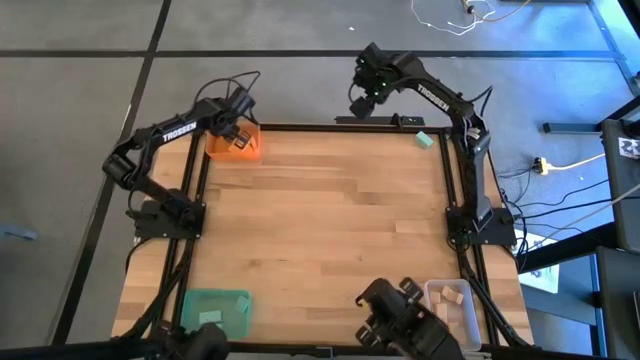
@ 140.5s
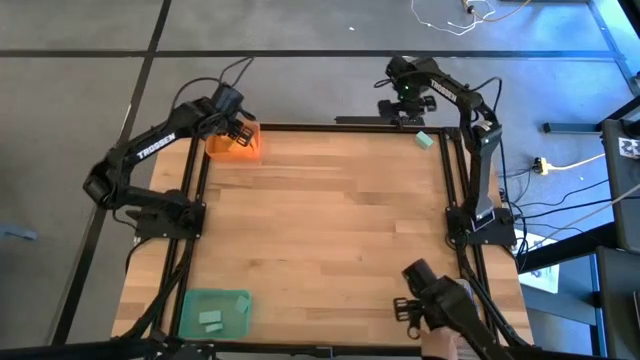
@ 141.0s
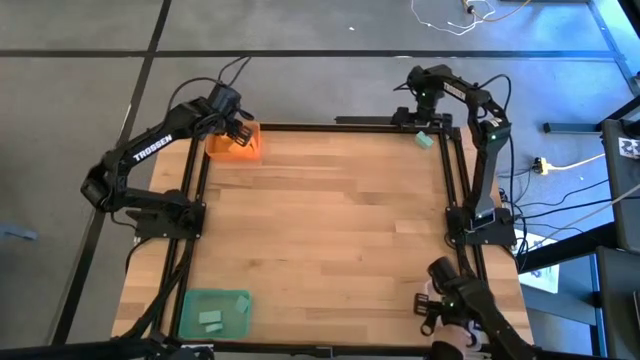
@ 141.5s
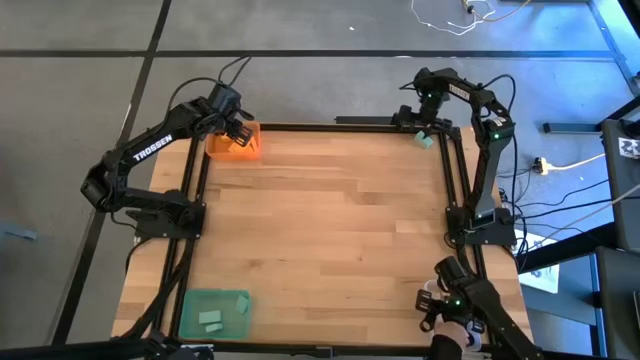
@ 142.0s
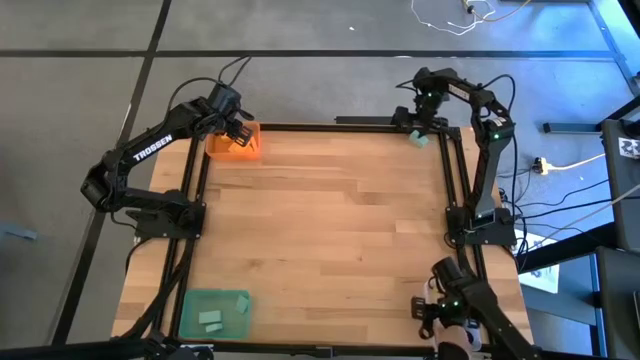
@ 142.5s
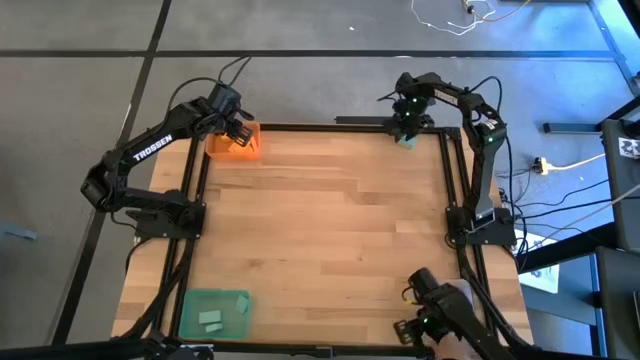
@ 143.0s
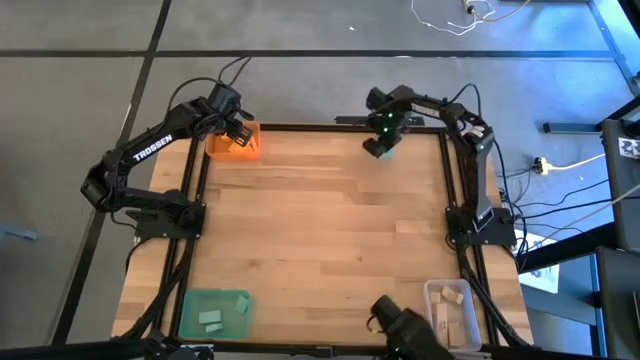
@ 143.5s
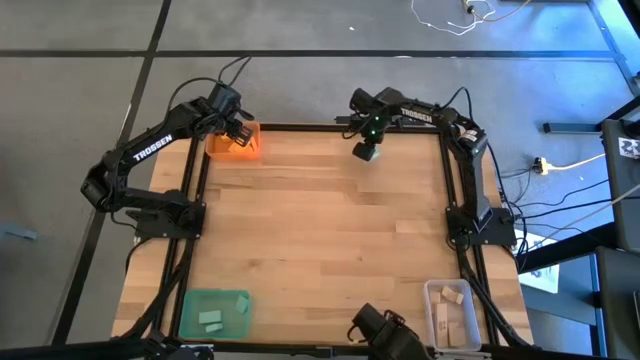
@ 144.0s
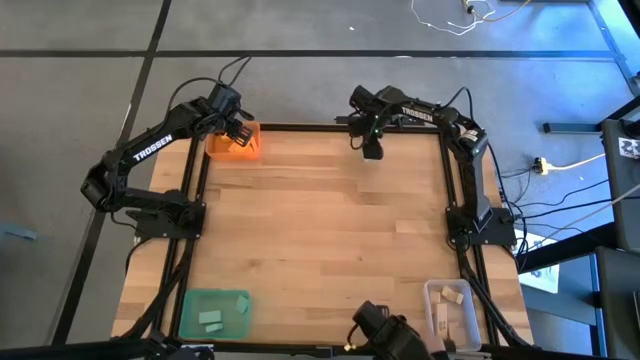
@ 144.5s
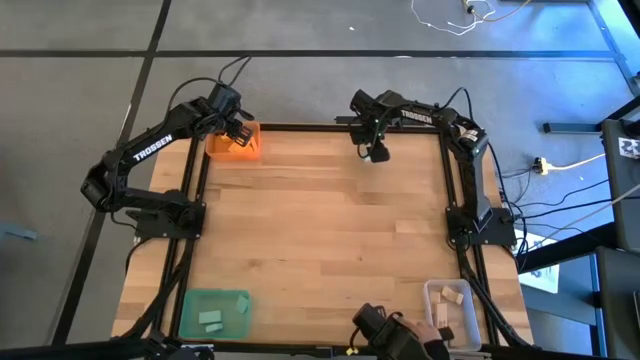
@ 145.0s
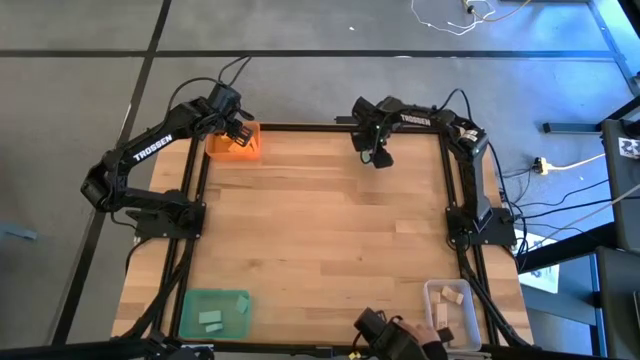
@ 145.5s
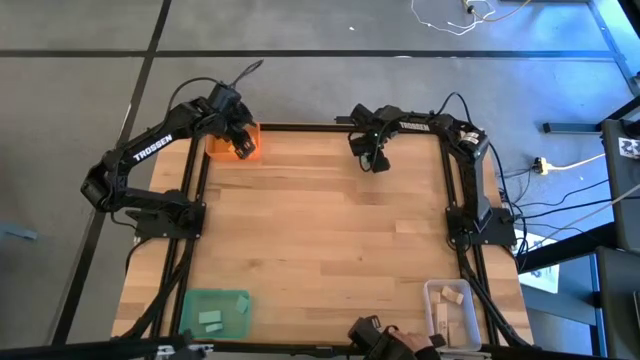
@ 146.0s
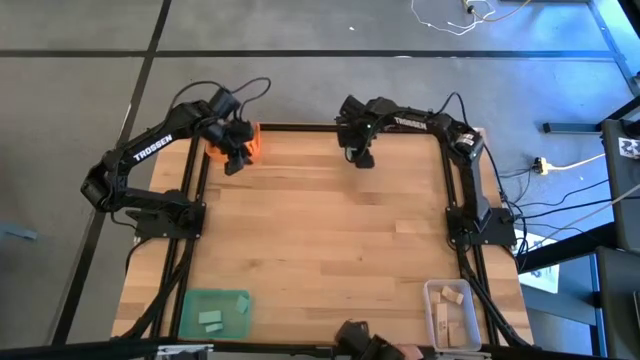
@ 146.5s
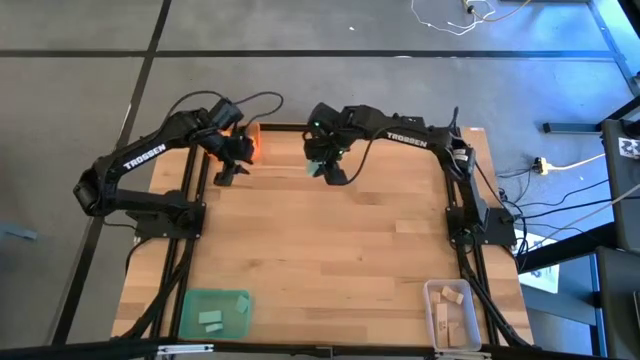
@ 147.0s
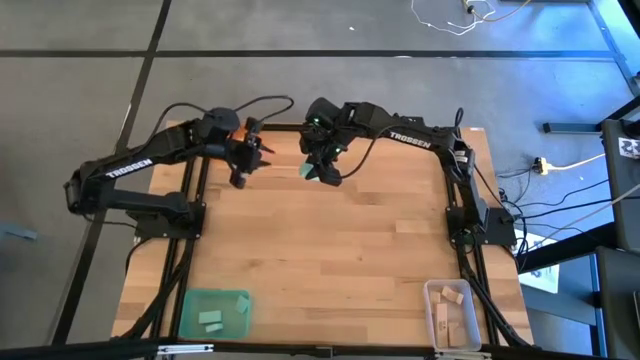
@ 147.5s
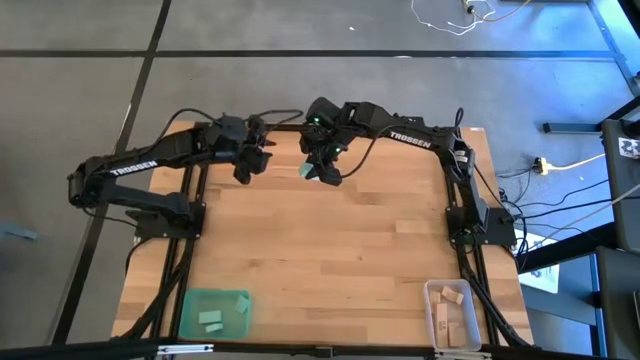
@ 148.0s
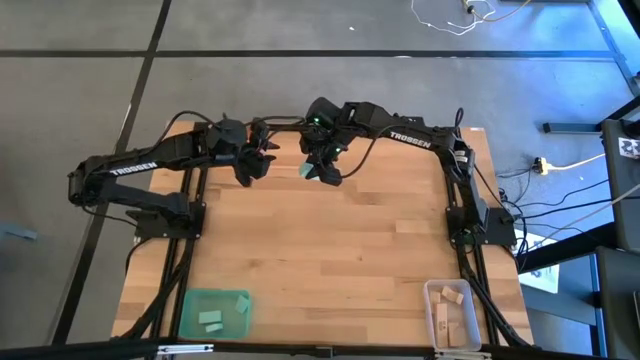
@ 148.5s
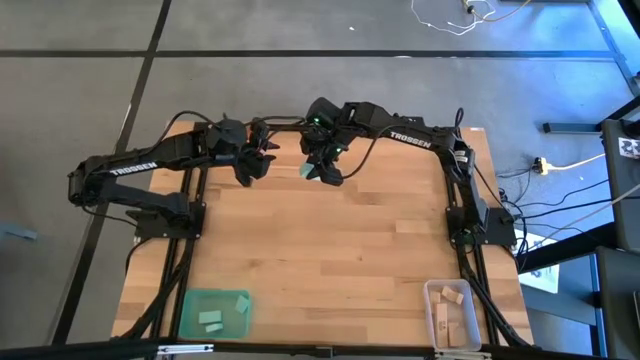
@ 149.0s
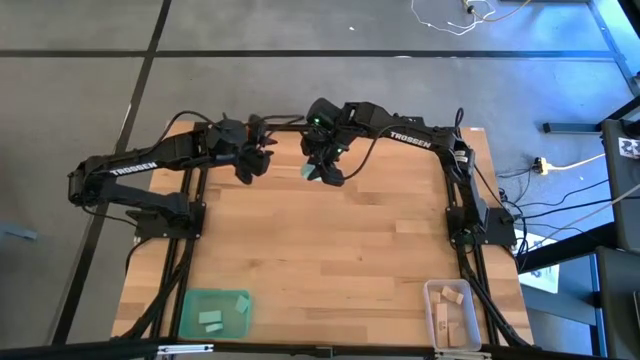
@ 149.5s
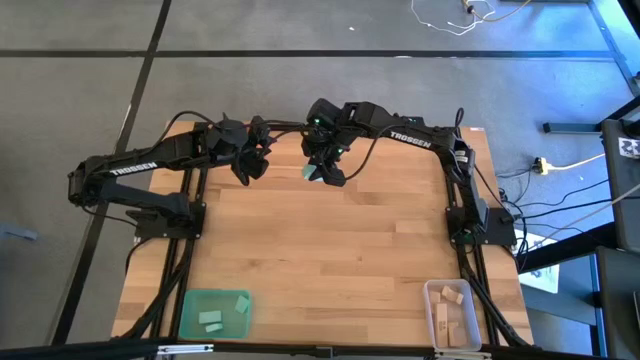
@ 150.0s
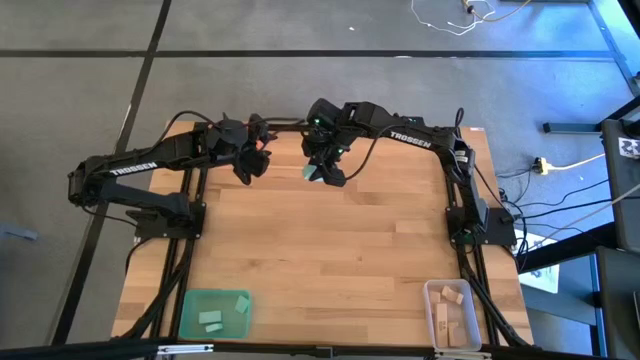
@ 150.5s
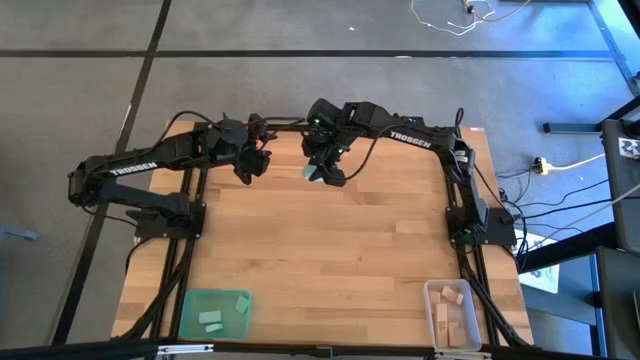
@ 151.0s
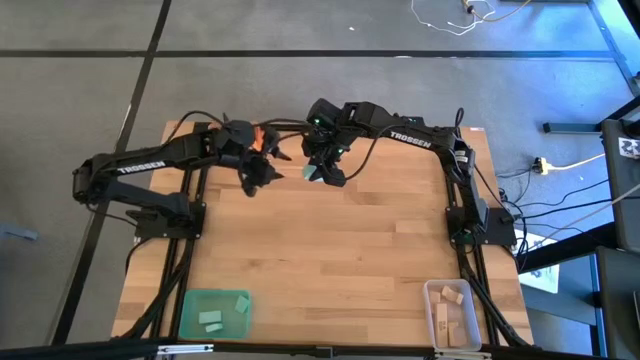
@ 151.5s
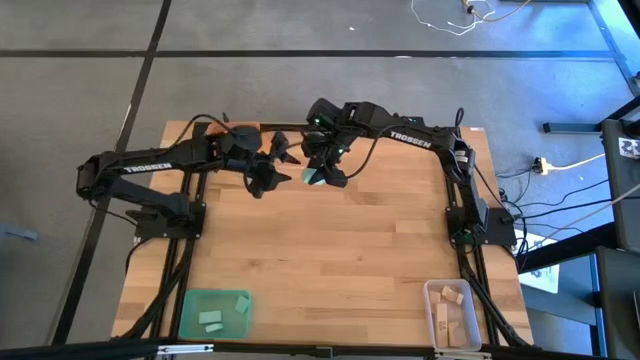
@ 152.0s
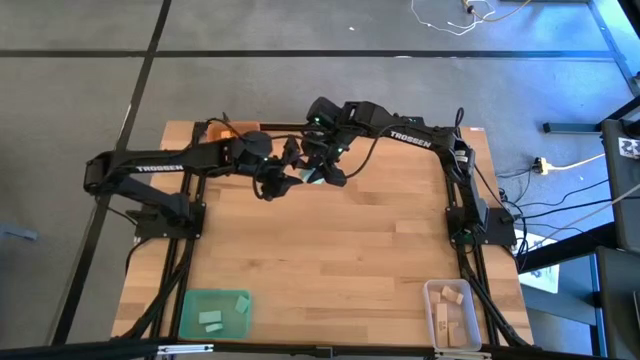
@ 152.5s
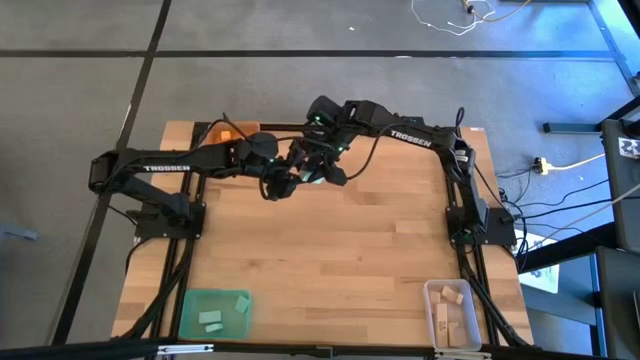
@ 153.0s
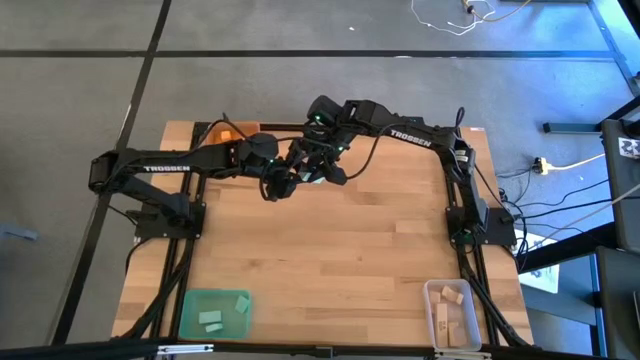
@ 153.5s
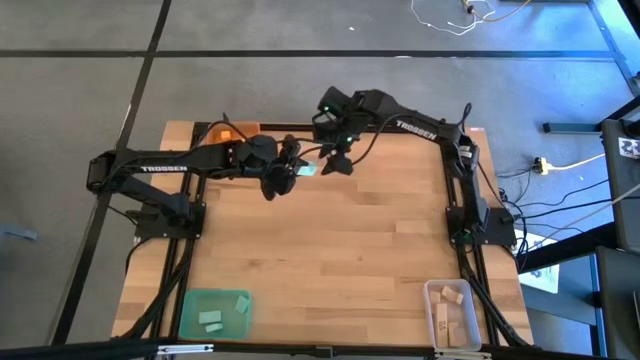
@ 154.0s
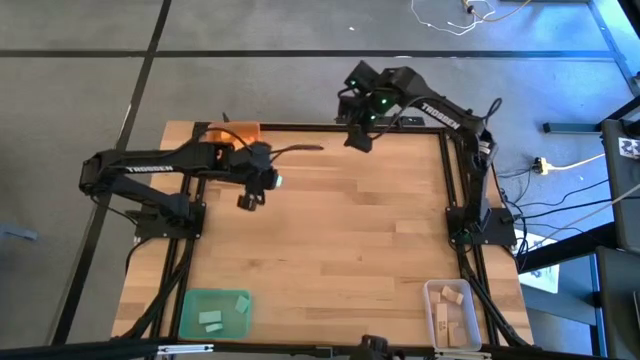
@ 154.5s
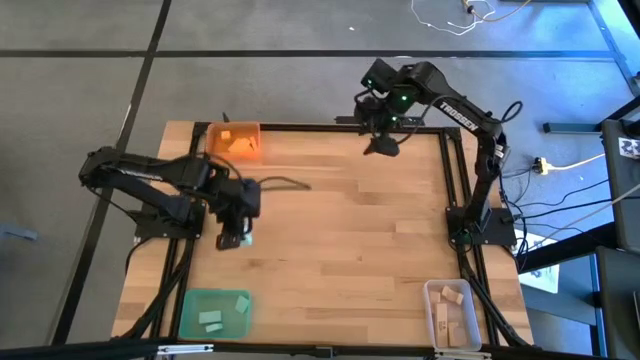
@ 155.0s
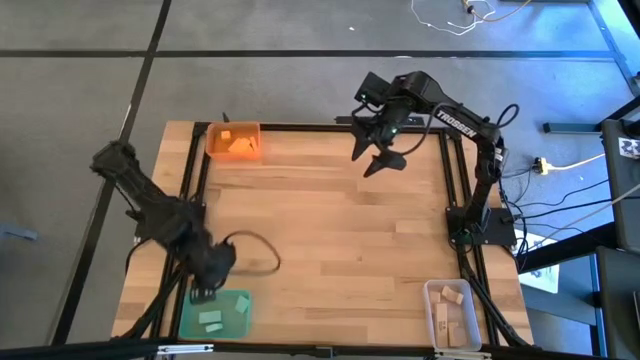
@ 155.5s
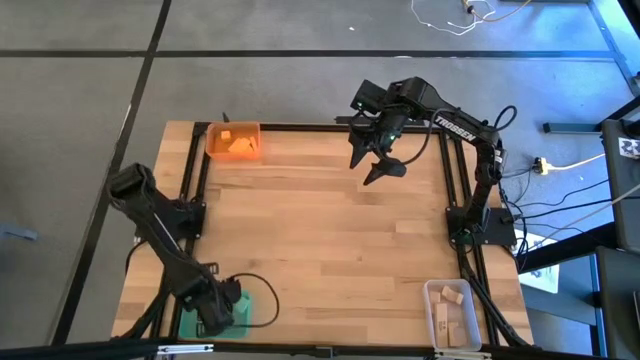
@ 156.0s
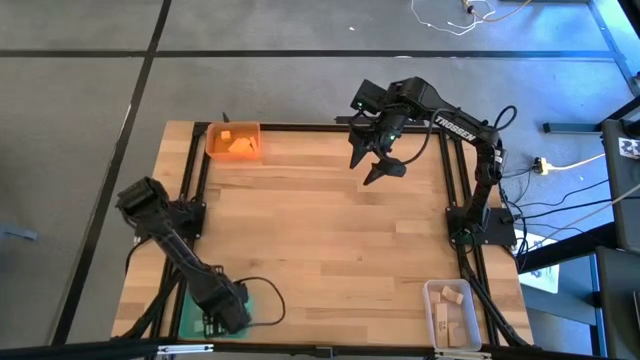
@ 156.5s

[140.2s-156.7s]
Task: Sort & place blocks by color
Put the blue block into the blue bin

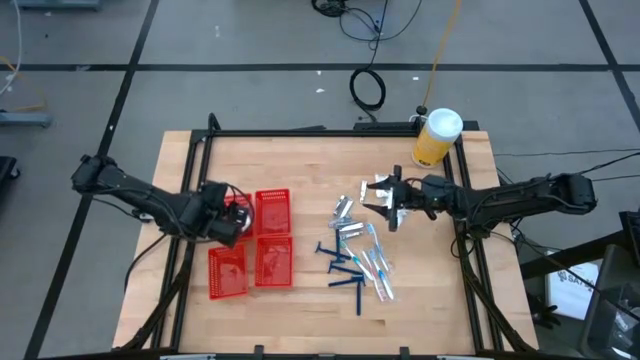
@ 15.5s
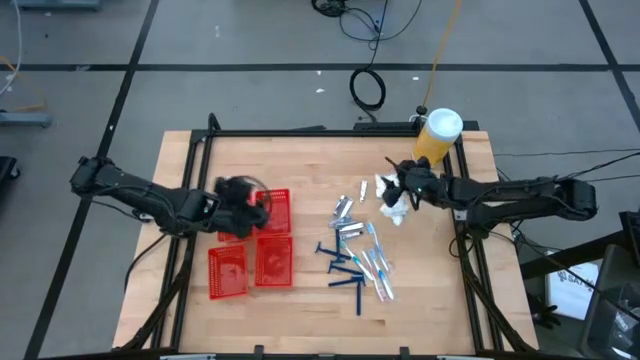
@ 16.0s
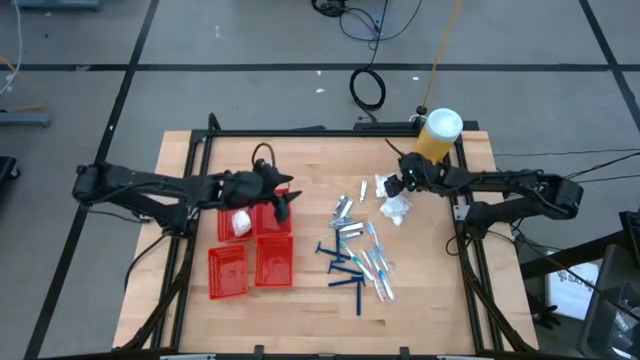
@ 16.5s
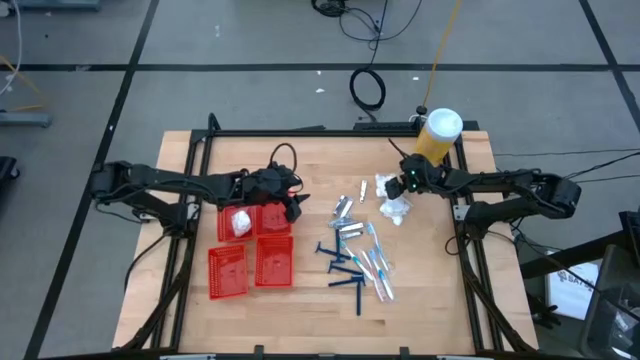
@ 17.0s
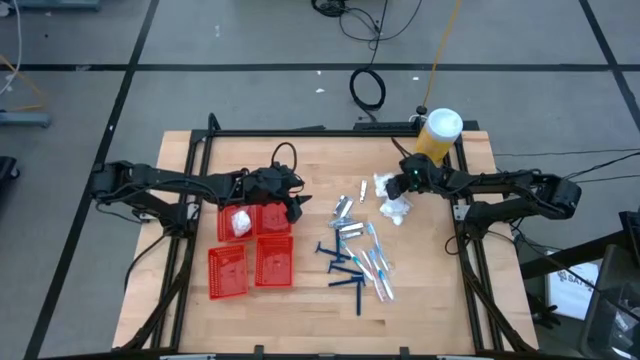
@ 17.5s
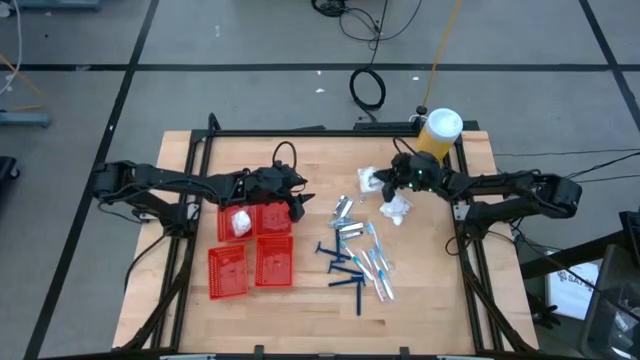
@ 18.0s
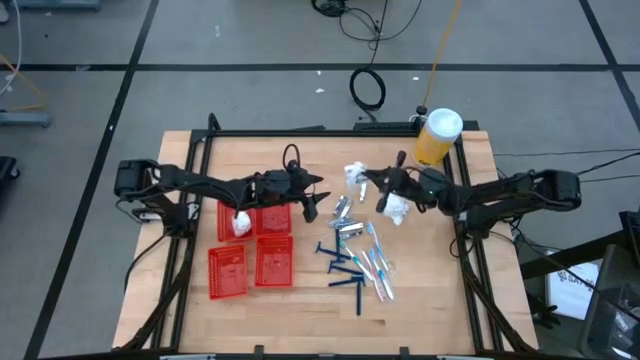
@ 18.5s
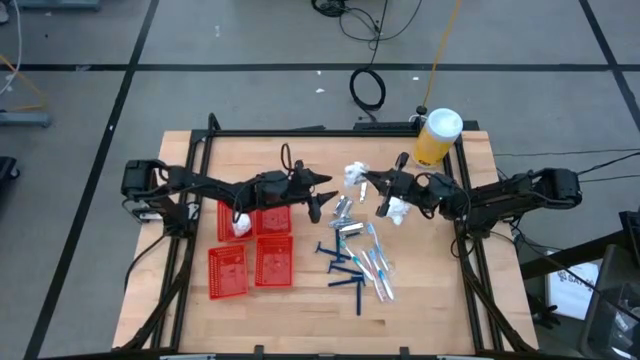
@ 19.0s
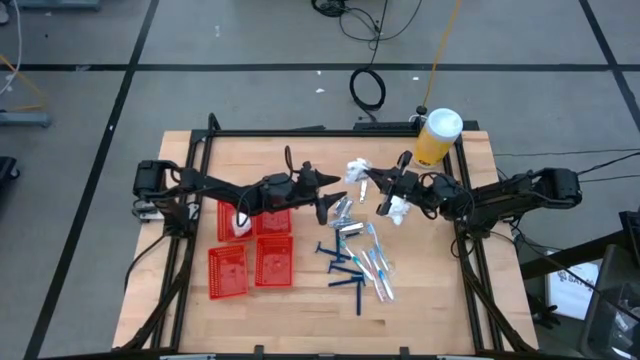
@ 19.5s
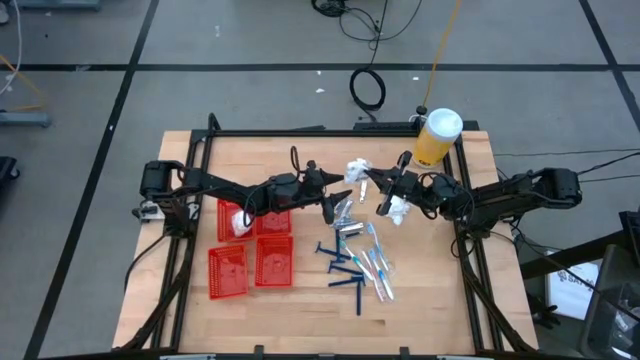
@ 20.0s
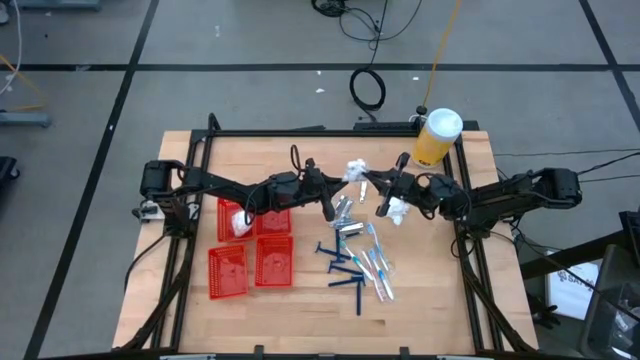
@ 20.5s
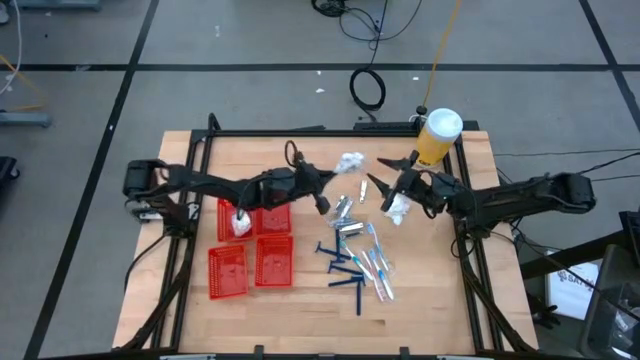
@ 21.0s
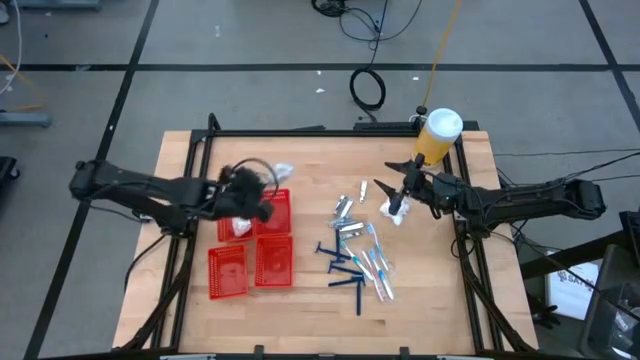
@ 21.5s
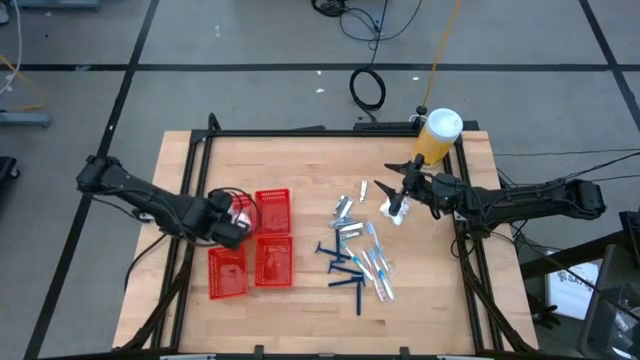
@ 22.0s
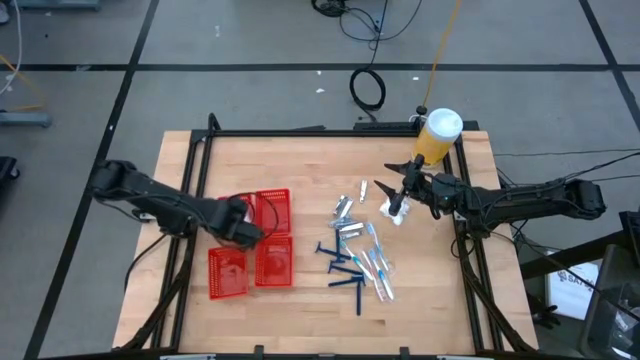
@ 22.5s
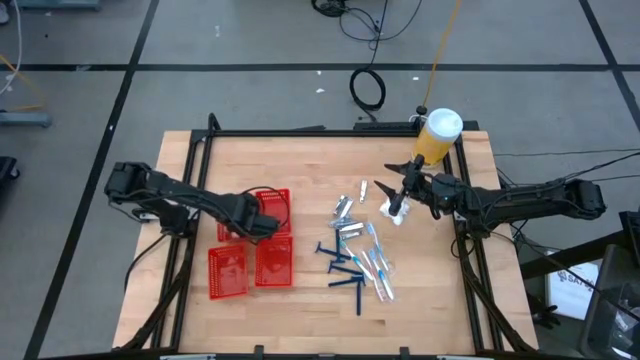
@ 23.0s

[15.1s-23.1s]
Task: Pick & Place Travel size toiletries
Put the transparent cotton pack into the top left red basket
